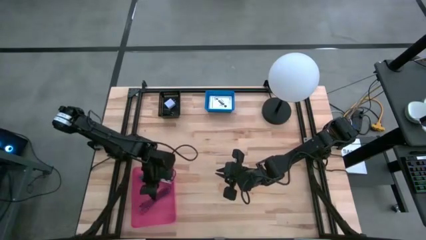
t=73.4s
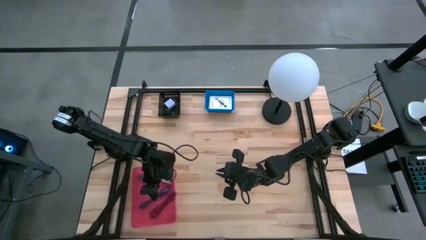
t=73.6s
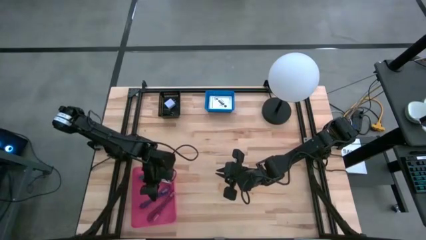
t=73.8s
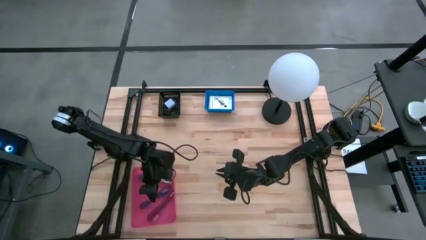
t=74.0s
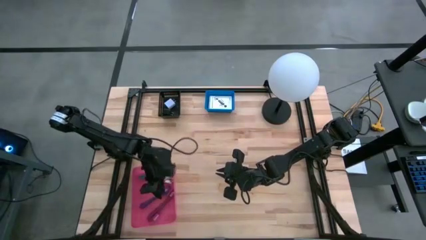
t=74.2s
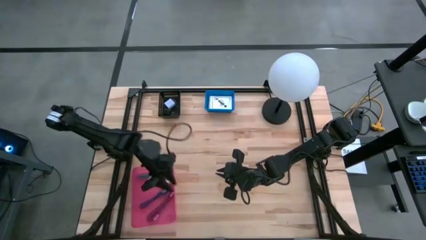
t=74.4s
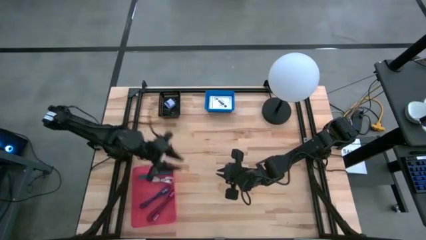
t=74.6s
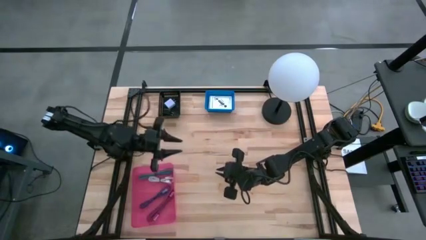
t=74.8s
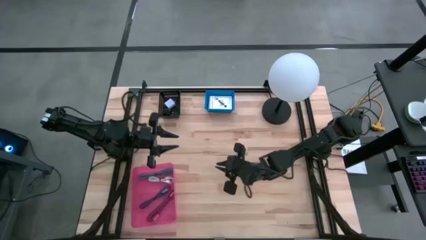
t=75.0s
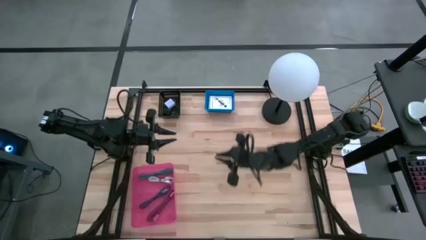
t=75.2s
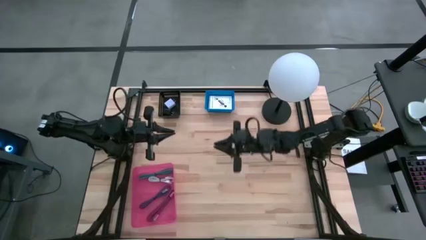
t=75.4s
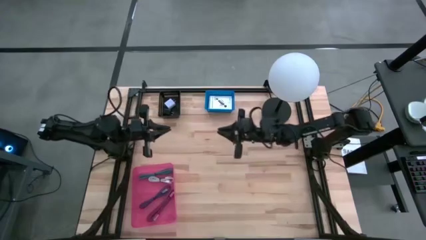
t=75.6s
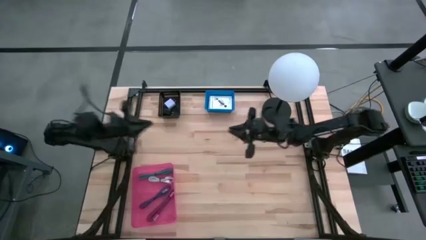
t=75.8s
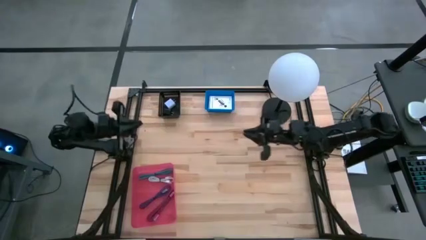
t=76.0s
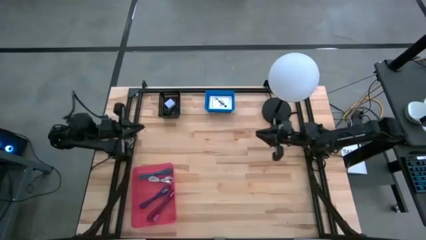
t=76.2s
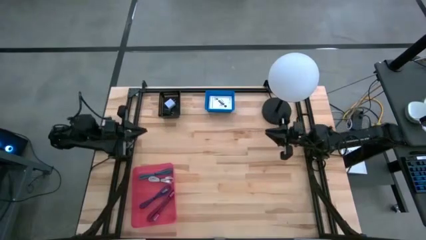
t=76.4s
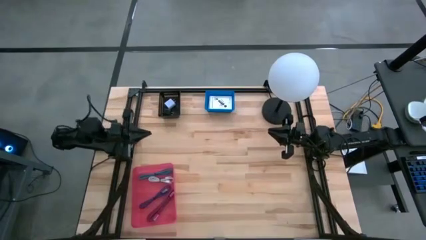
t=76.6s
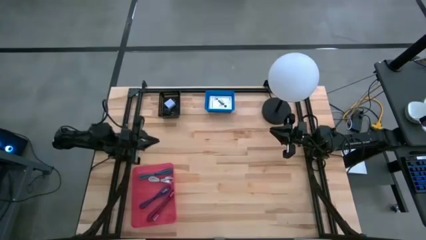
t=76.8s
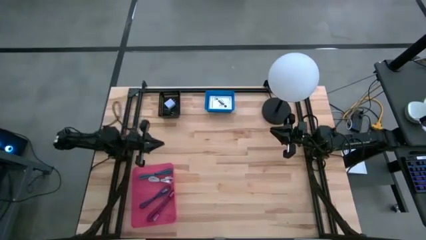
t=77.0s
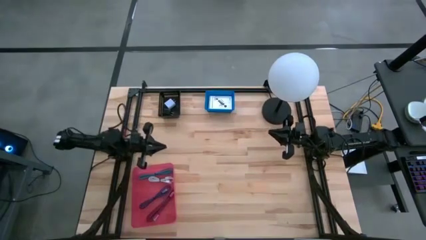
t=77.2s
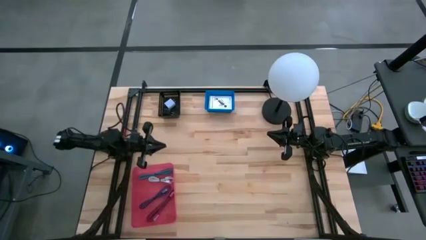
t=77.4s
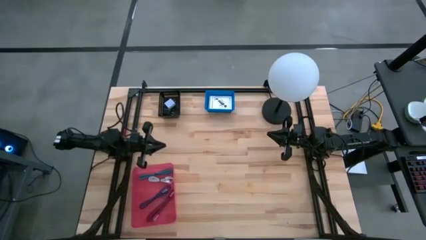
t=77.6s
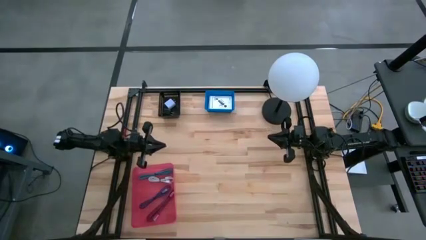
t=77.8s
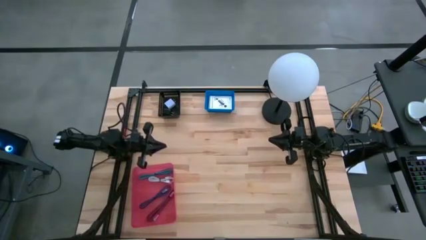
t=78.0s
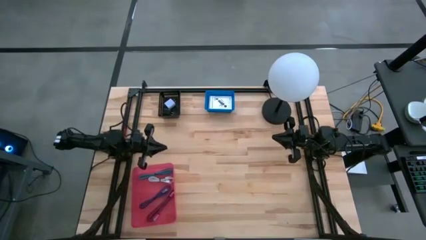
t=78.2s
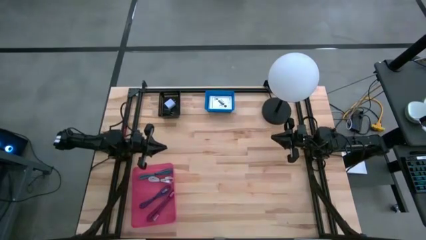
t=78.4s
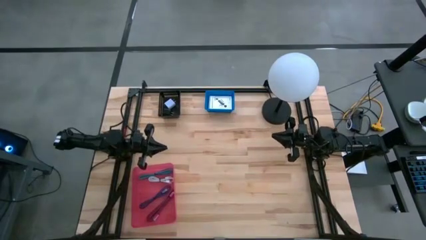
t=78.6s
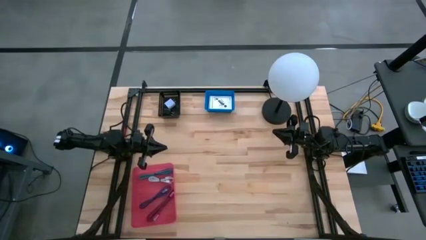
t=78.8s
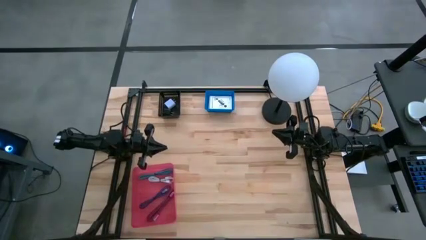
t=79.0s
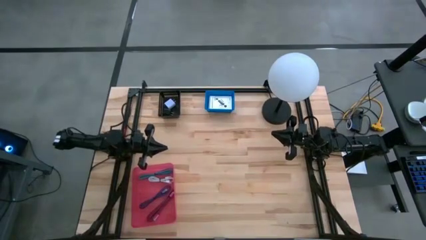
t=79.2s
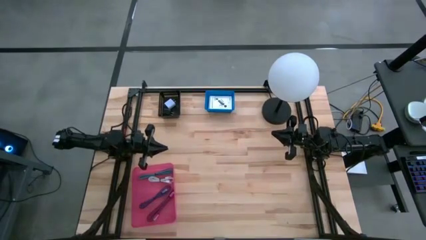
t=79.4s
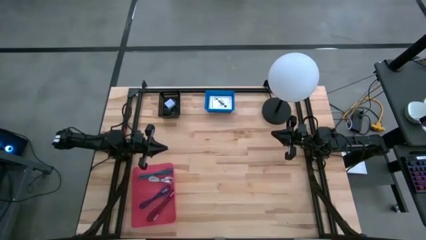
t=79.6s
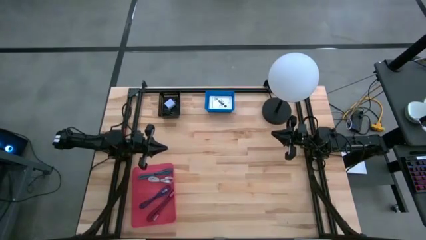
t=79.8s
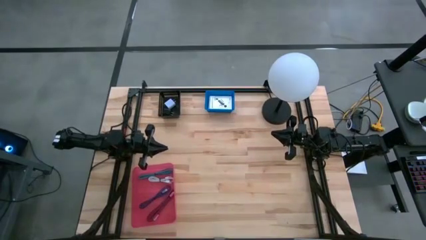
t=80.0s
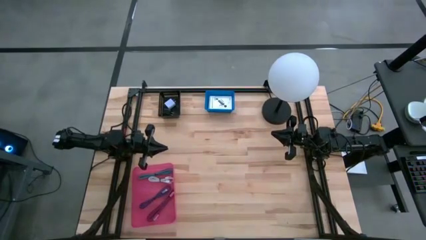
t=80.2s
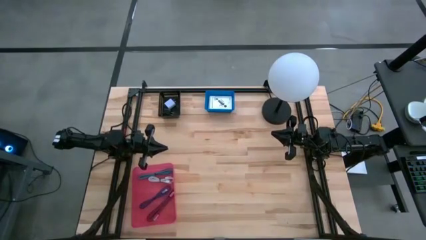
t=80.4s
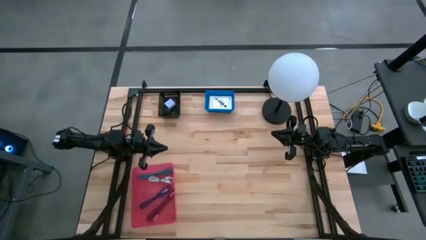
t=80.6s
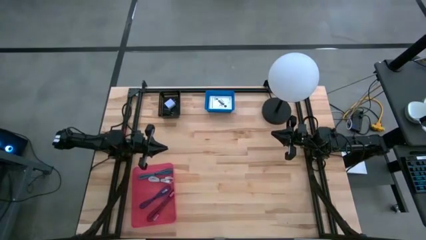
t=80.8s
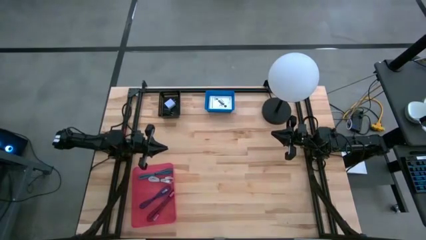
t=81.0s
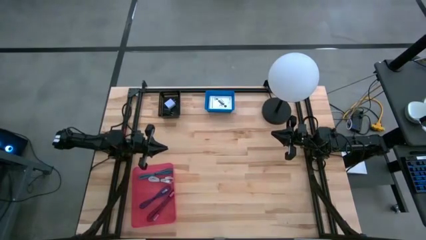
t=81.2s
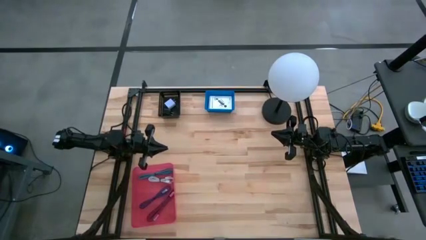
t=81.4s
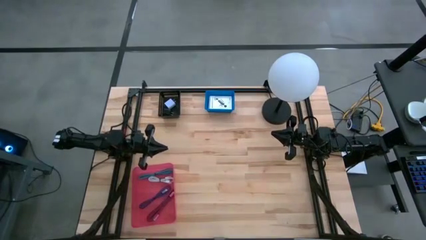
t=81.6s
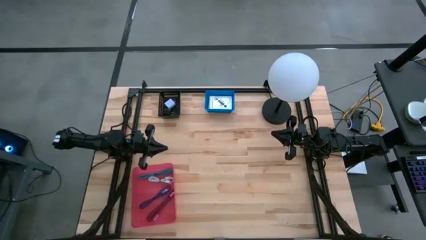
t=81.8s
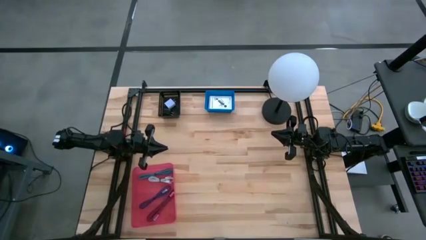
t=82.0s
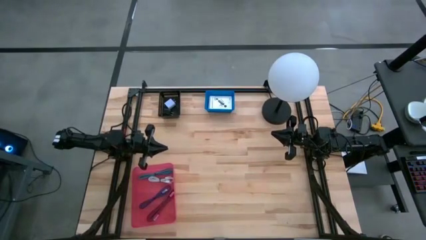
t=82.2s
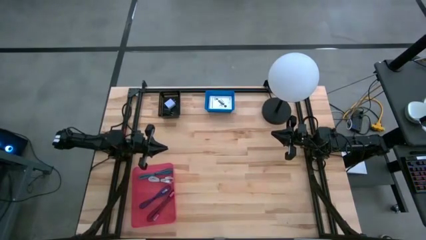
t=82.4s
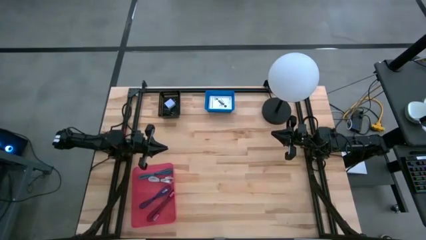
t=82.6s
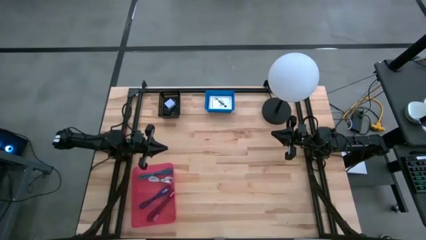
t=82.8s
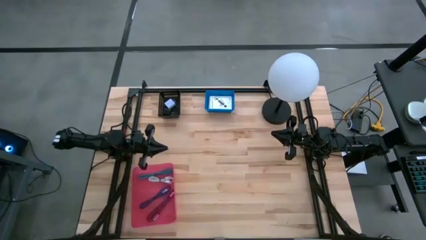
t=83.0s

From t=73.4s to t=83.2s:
Task: Pick and place items into bin
Return to Home Position

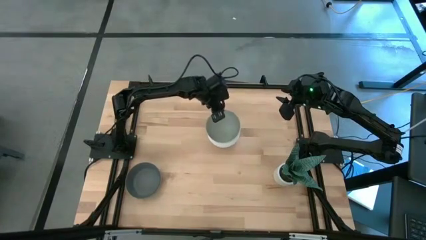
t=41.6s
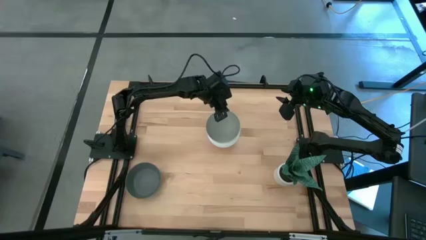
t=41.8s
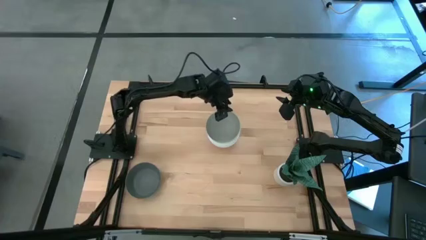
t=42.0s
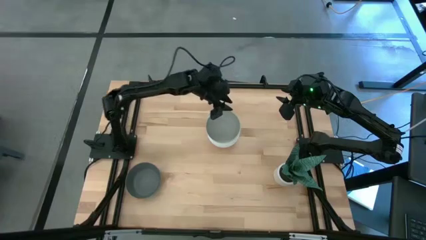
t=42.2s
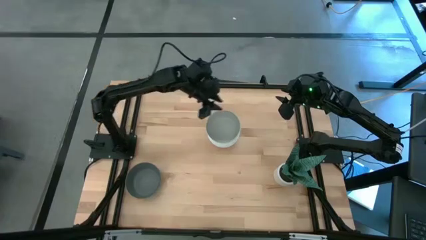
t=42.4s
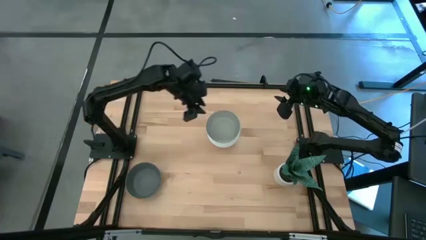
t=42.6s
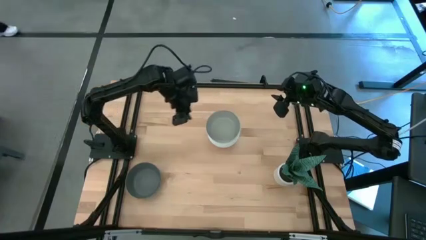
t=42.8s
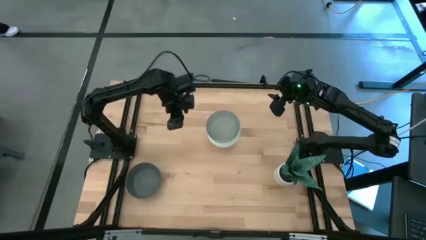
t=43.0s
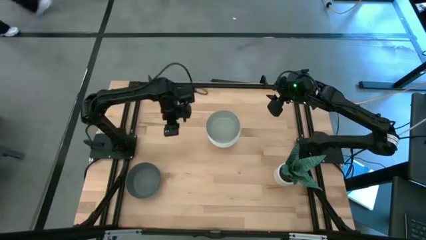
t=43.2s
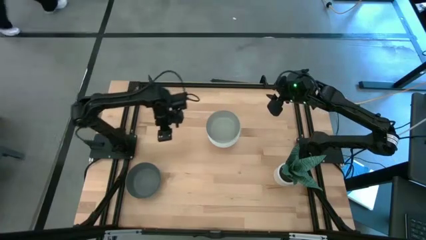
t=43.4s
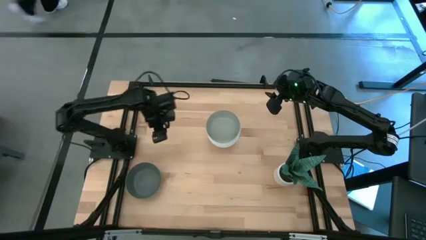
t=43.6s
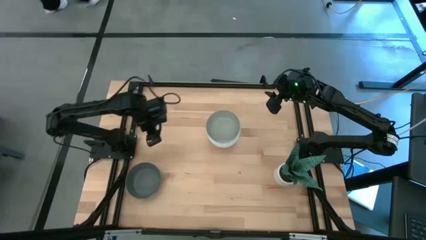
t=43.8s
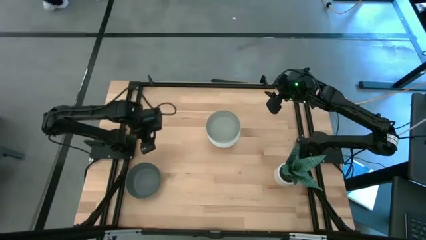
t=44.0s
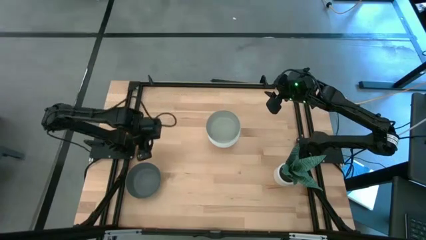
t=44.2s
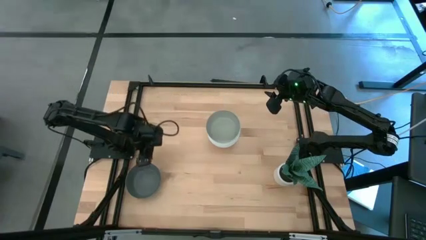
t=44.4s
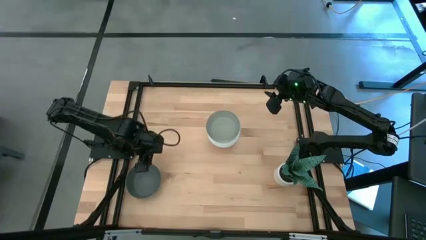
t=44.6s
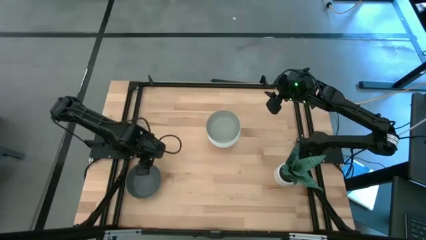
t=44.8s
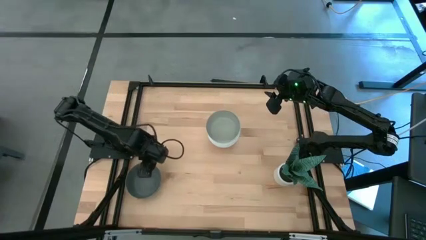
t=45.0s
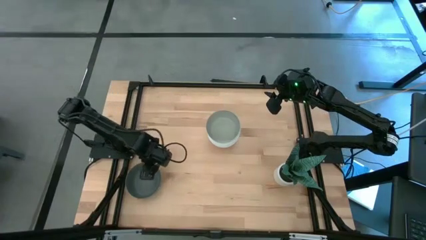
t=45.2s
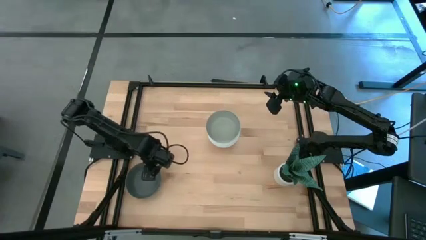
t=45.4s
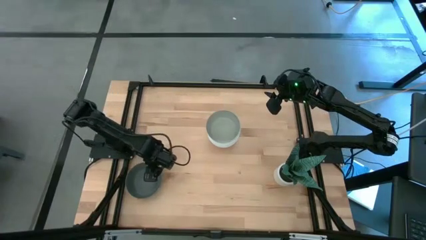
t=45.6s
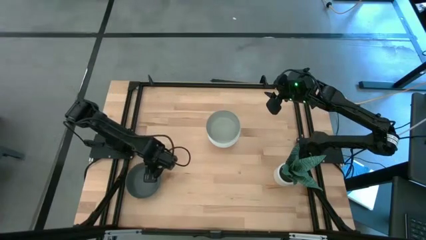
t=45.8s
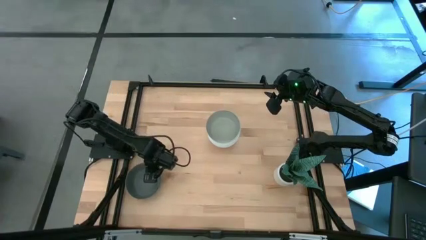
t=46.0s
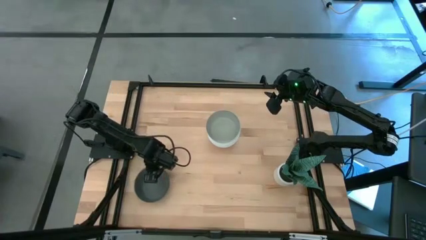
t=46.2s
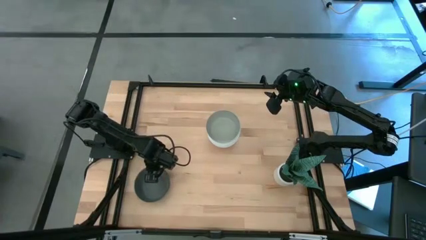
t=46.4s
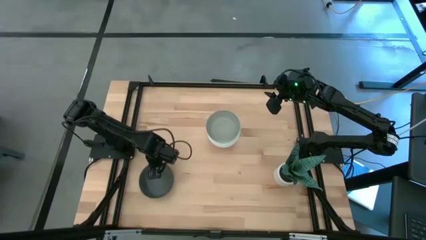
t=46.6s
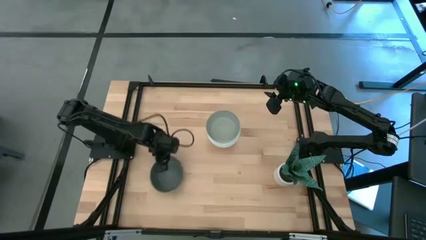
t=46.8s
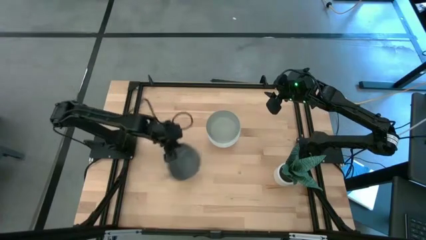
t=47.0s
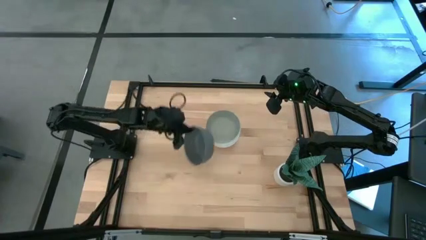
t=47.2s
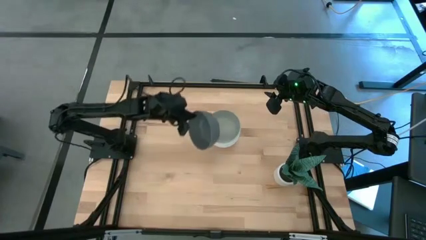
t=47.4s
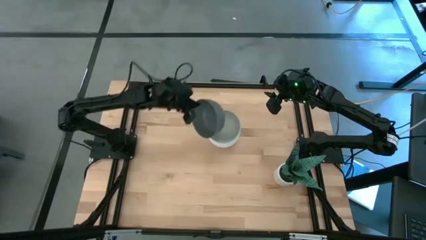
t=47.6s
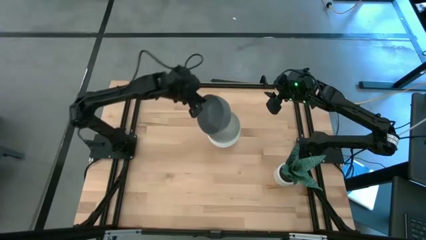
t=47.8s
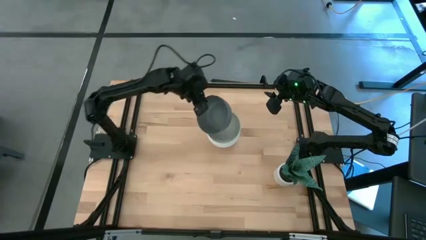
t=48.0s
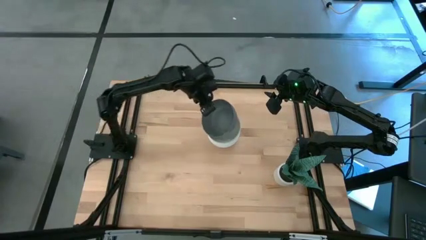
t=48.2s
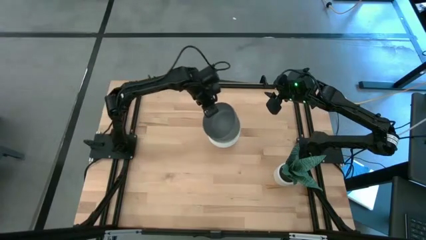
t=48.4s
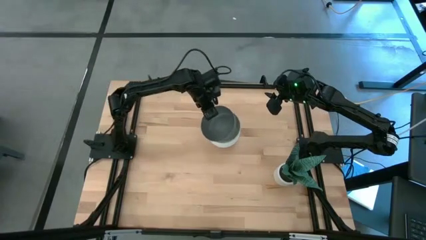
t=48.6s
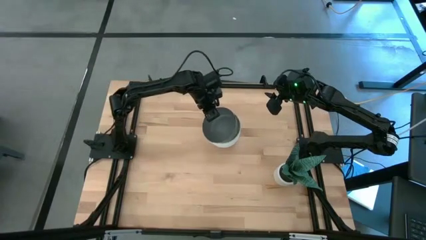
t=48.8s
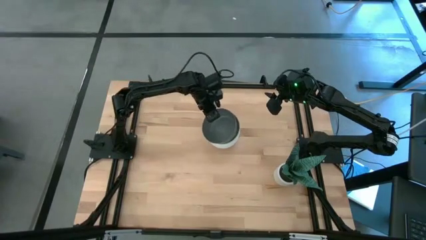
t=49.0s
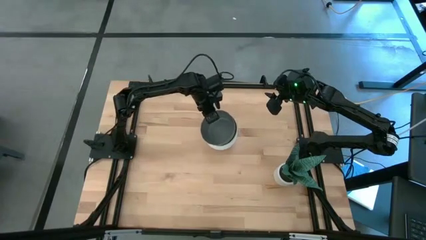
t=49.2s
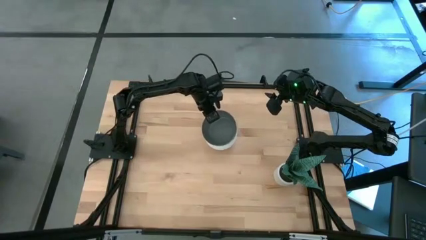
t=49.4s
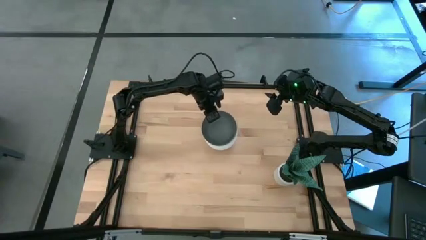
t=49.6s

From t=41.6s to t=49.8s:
Task: Nest bowls inside each other
Stack the dark gray bowl on top of the light gray bowl
